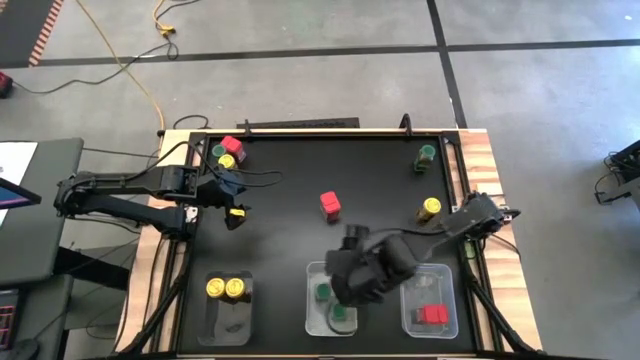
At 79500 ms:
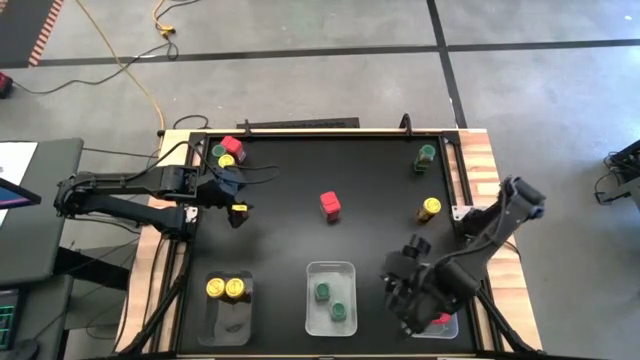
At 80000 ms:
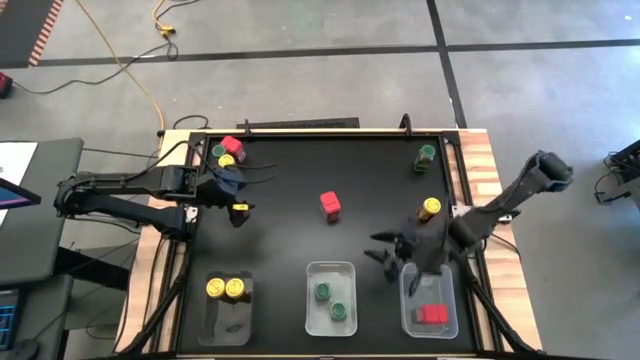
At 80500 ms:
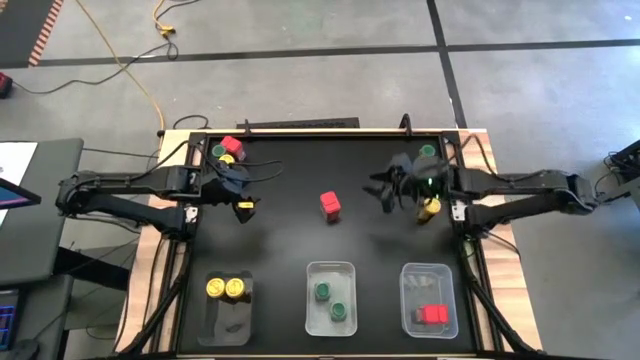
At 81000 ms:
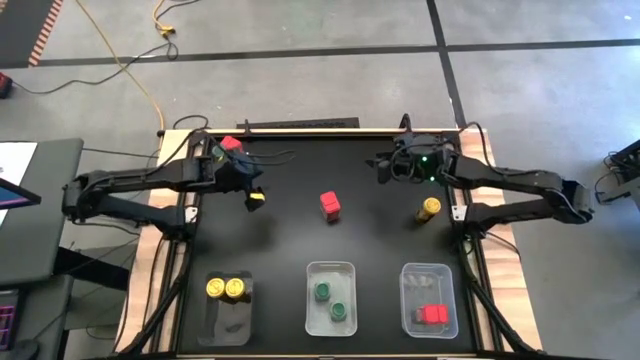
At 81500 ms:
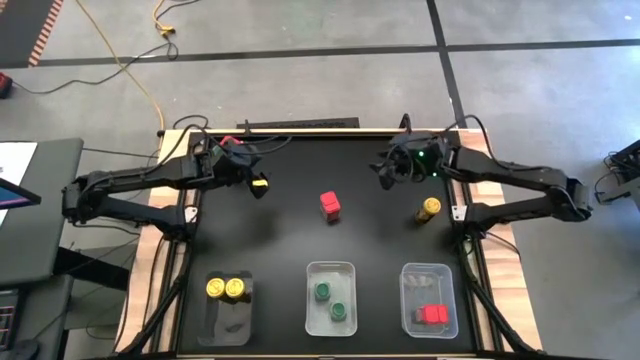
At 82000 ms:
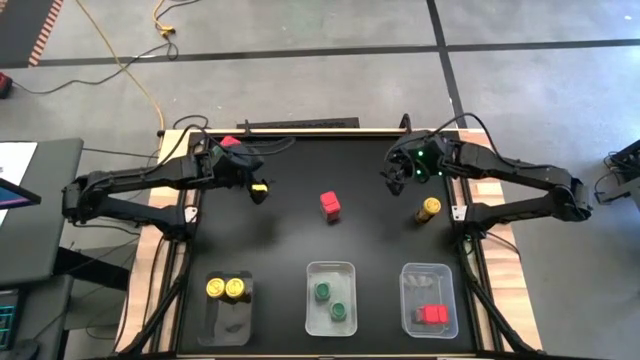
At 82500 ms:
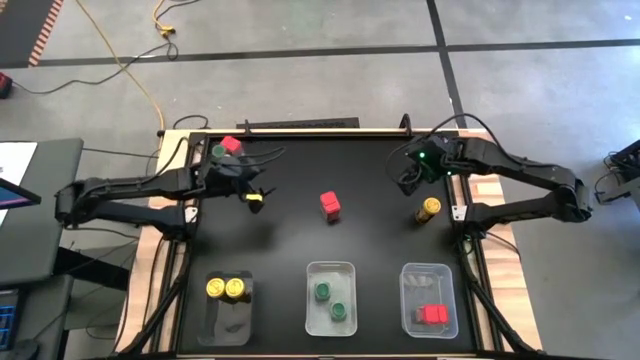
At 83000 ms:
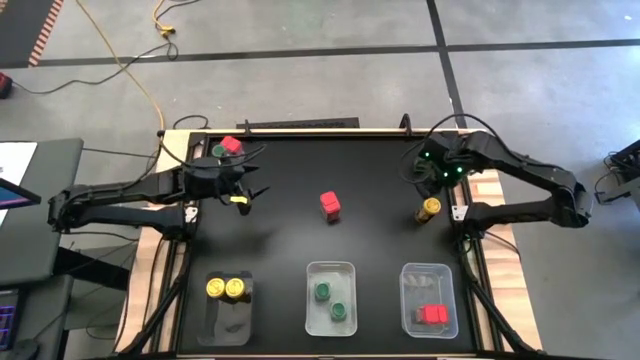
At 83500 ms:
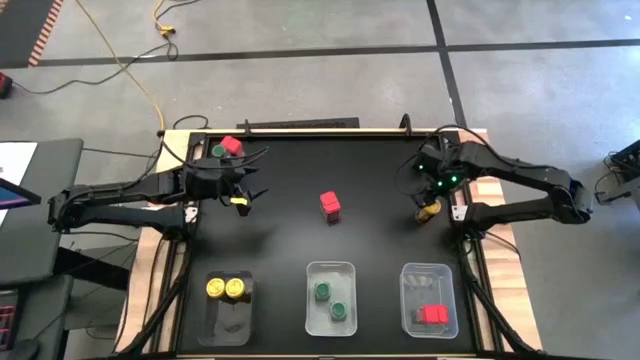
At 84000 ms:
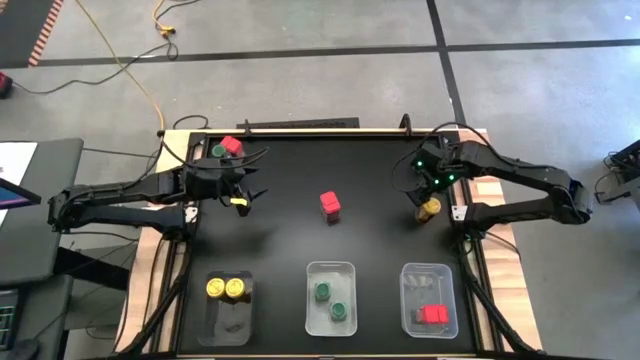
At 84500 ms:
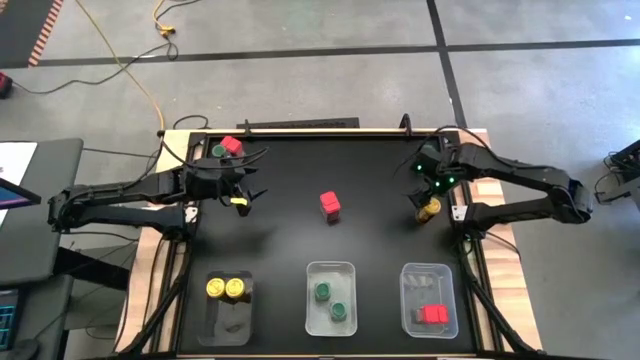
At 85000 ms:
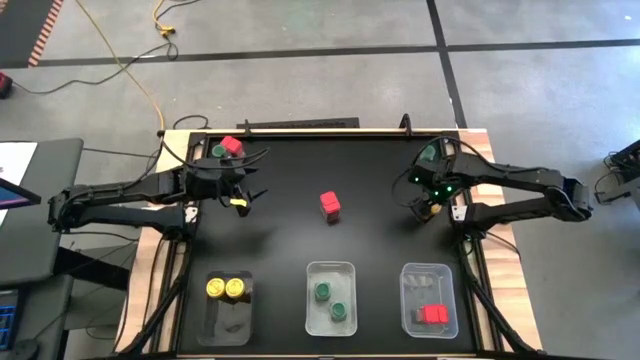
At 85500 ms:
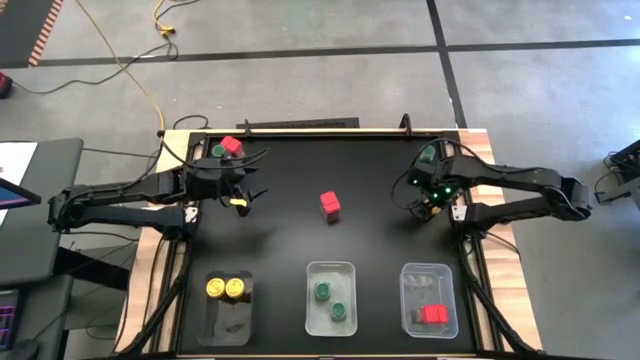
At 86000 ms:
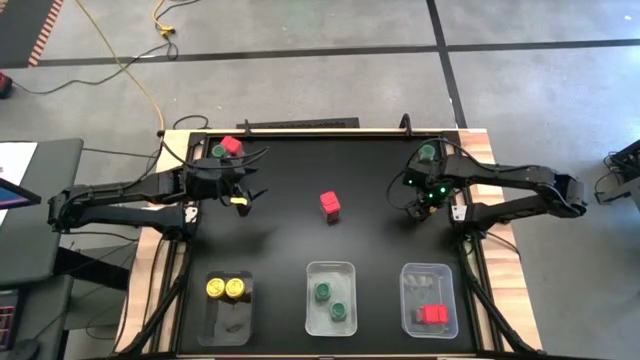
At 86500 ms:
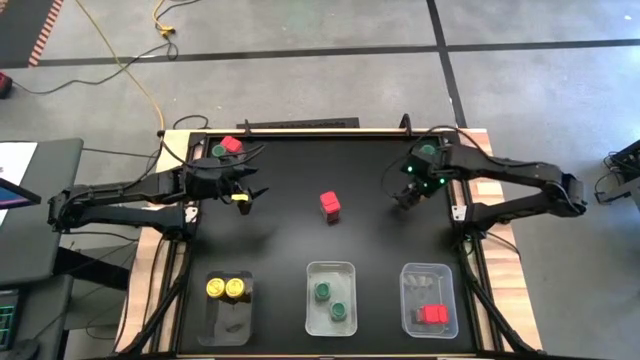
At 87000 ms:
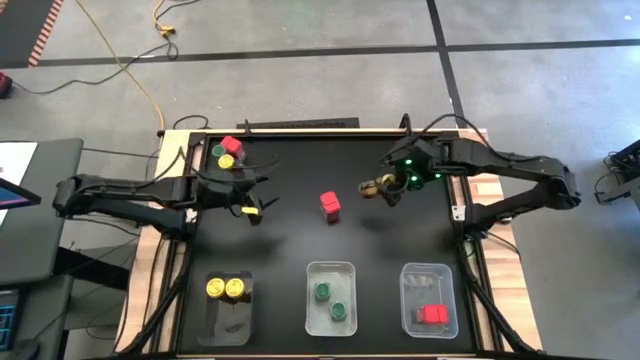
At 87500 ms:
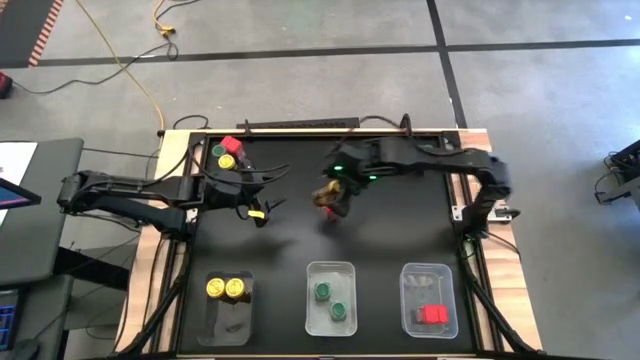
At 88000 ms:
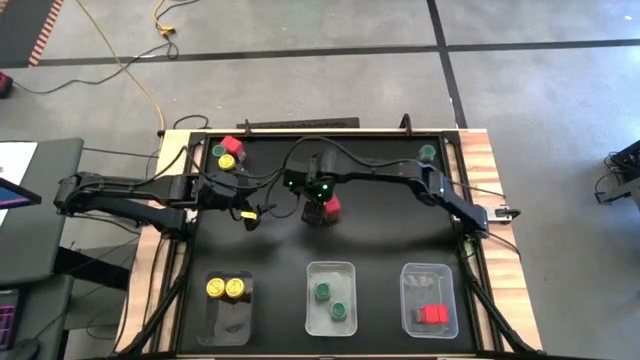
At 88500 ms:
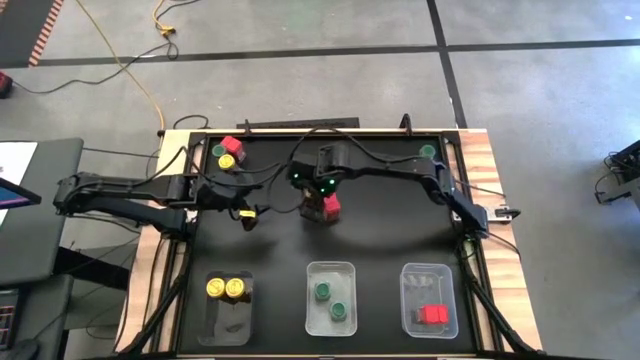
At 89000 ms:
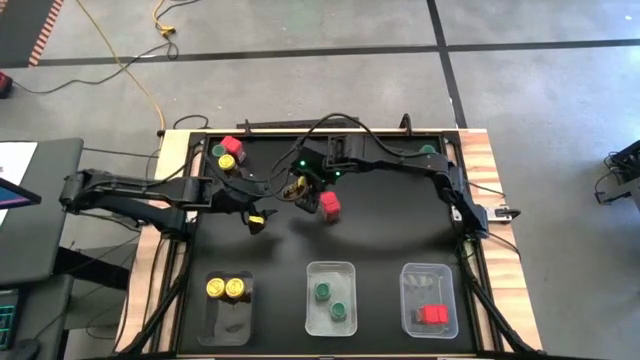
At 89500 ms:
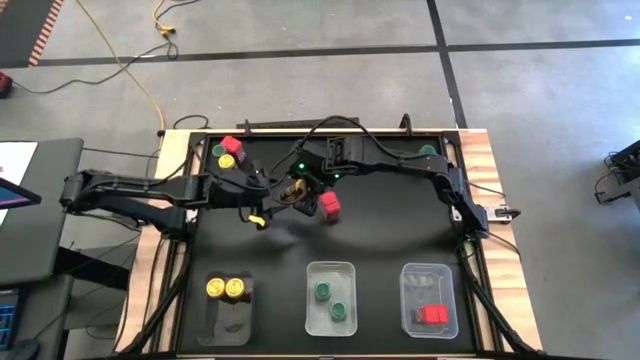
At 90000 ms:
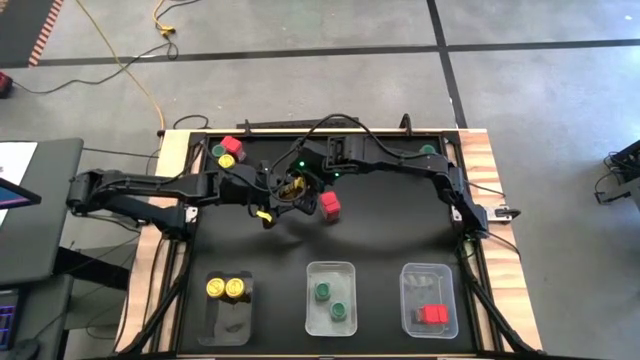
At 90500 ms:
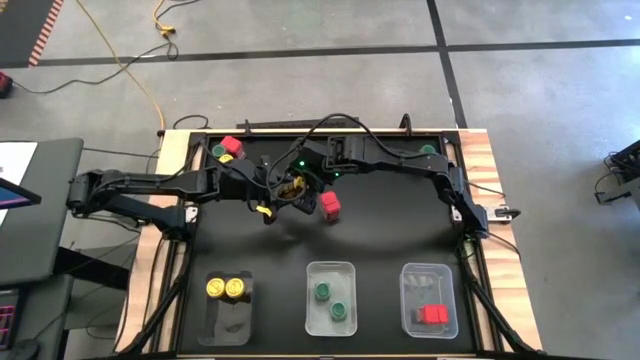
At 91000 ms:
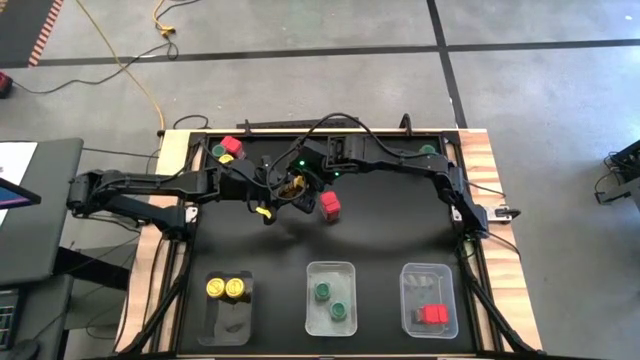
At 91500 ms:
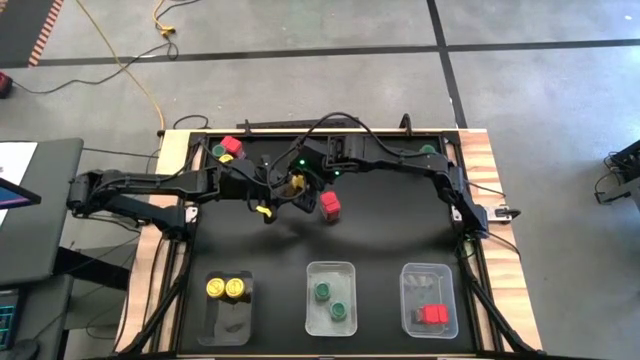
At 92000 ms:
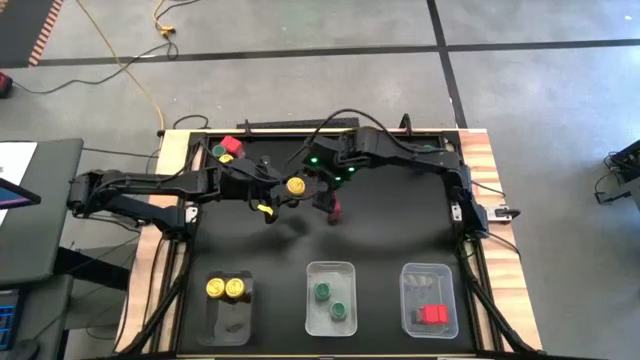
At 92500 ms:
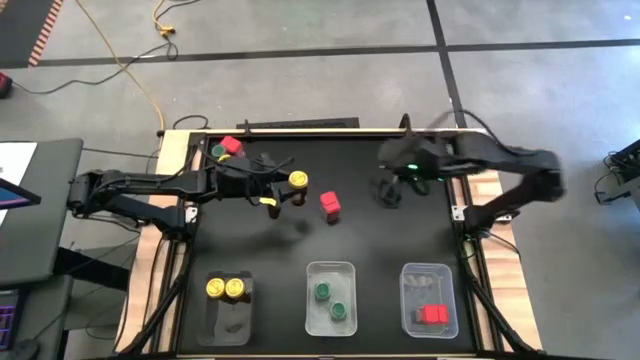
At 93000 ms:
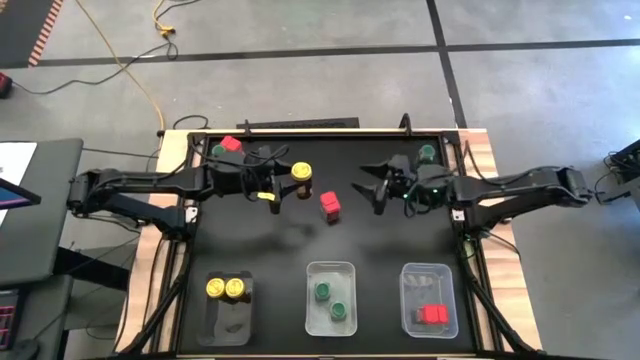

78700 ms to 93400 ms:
Task: Sort spices by type
Put the right yellow seasoning bottle into the black bin

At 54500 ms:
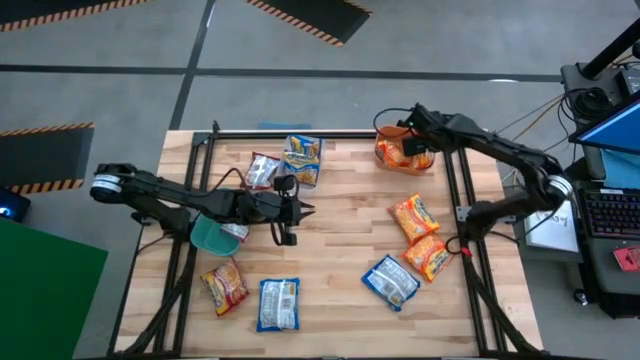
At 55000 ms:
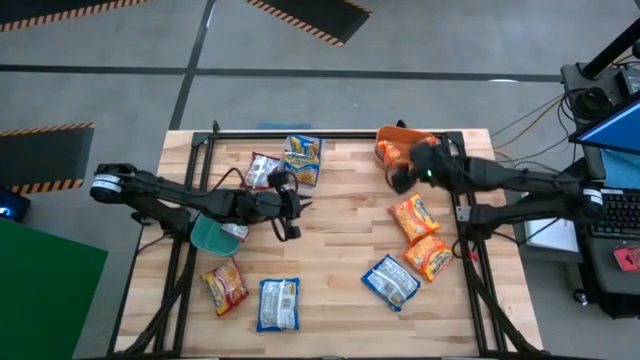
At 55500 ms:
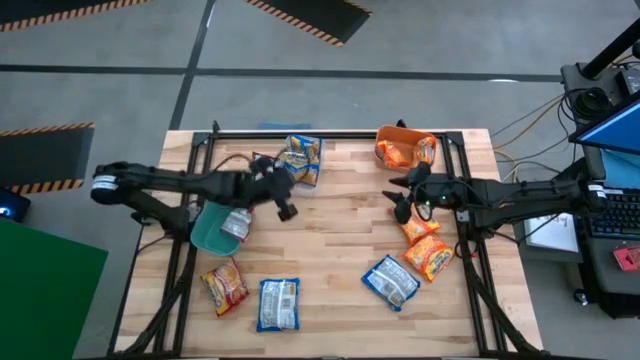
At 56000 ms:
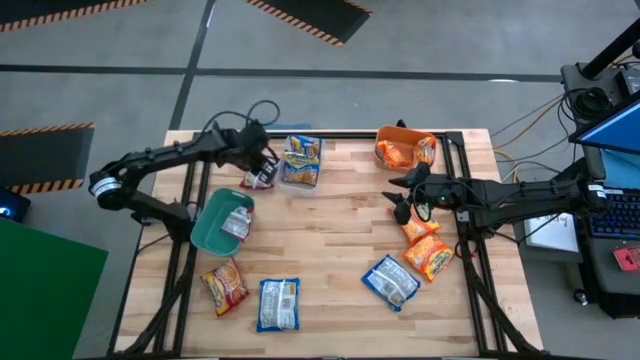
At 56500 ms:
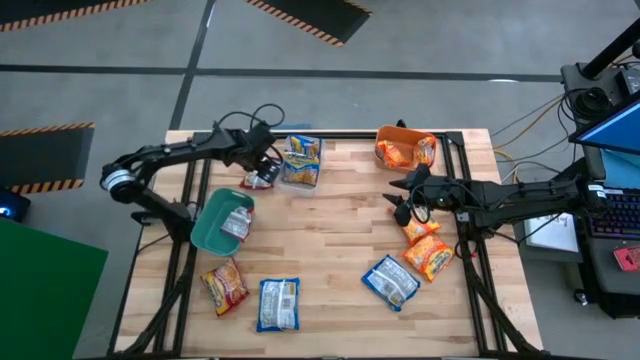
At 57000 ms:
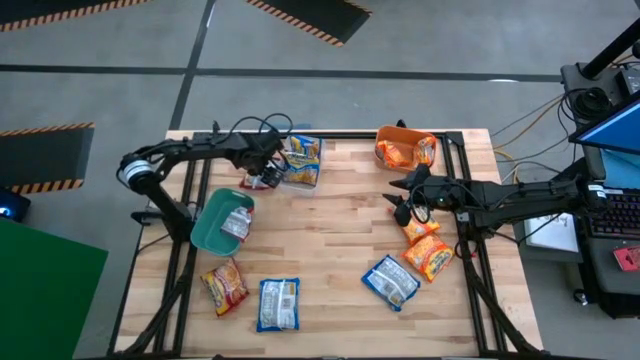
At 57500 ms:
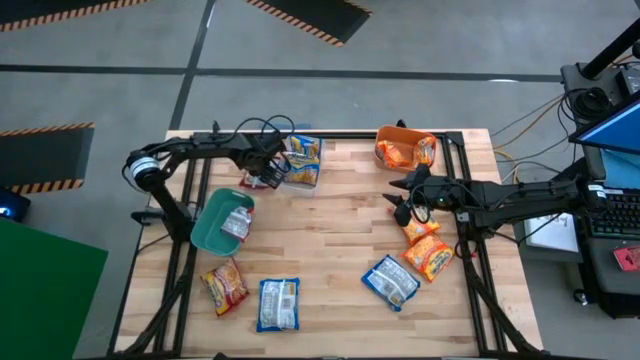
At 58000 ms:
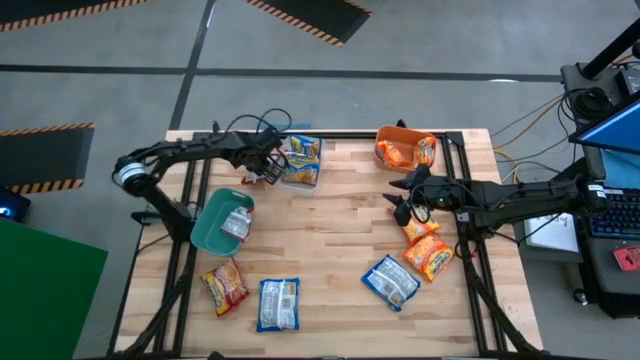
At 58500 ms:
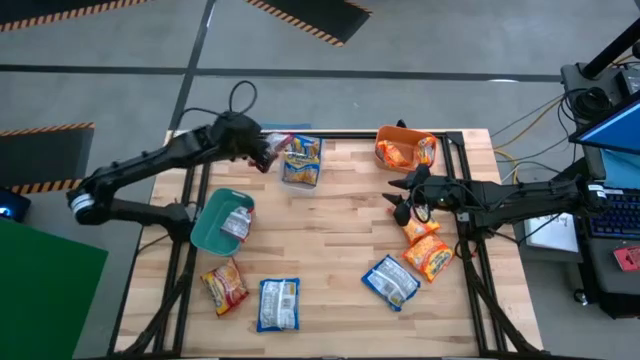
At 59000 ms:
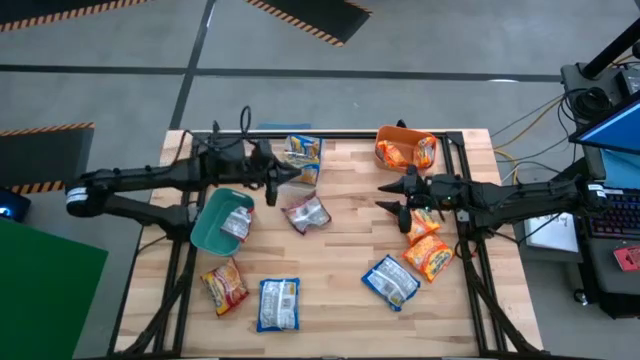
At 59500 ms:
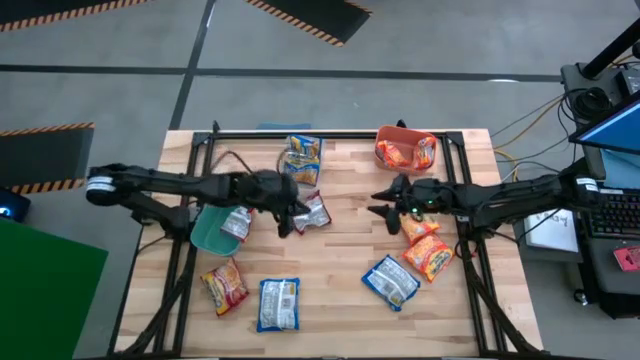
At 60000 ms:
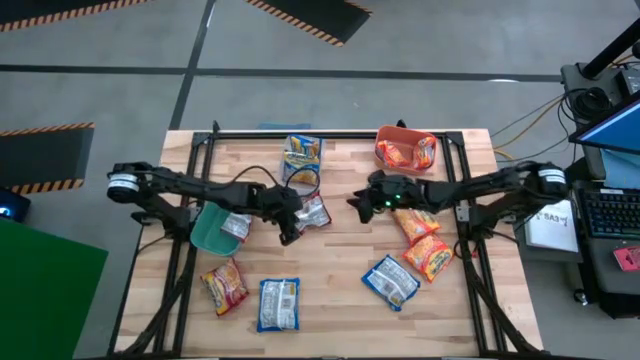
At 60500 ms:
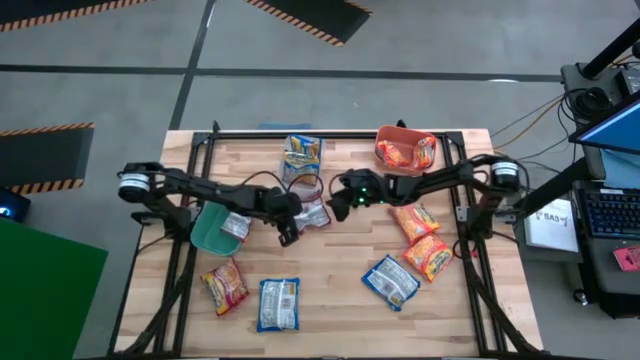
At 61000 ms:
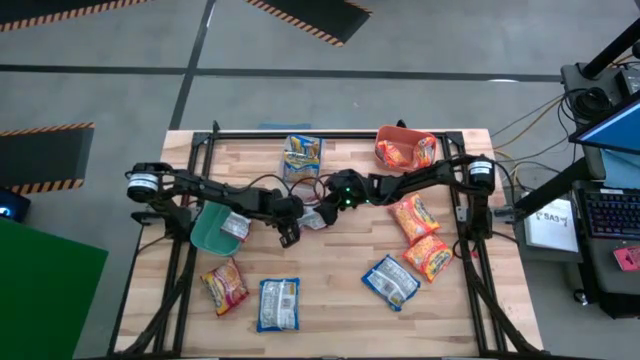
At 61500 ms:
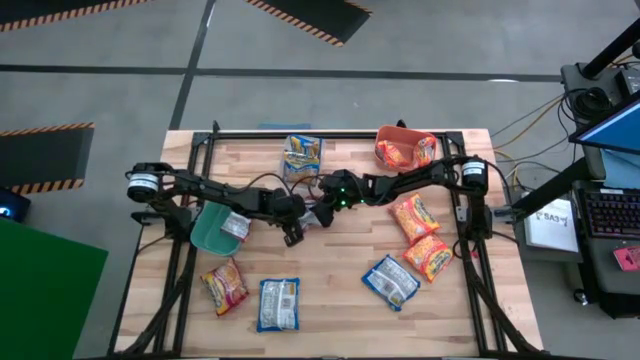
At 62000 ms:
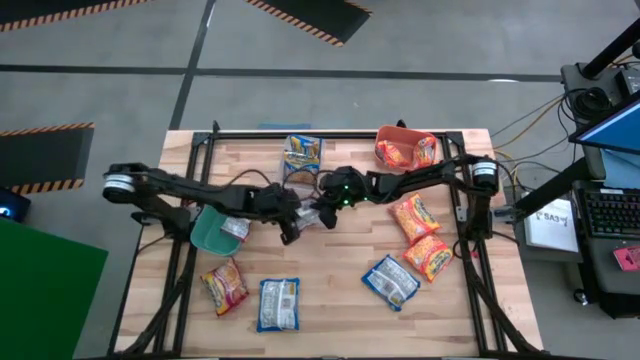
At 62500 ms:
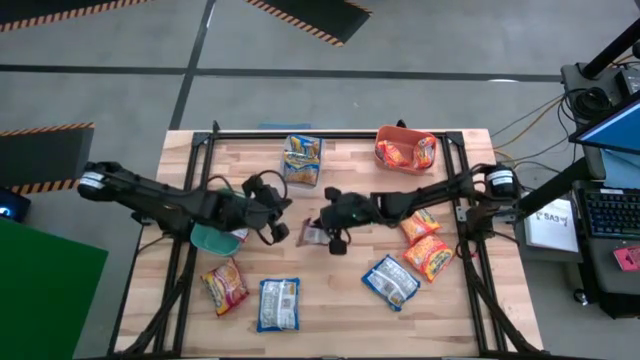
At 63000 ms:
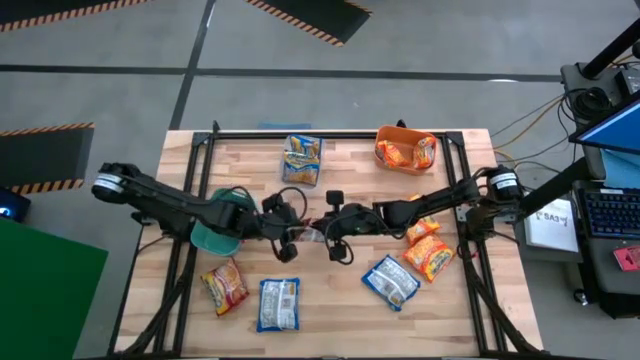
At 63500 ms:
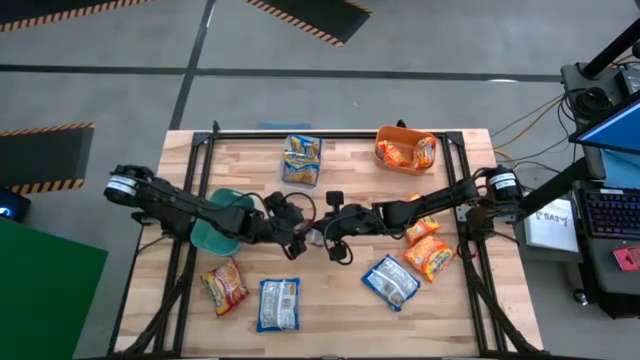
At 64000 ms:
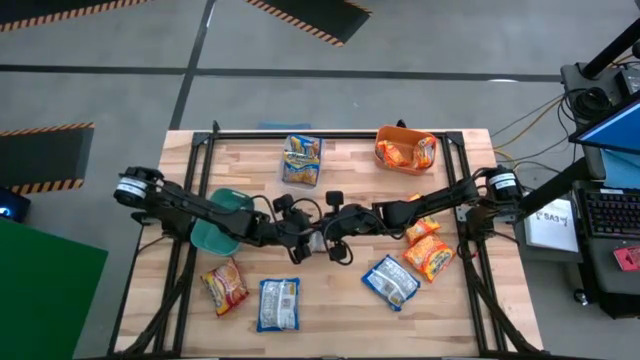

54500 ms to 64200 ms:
Task: Sort Maruchan noodles
Put the red noodle pack into the blue bin
